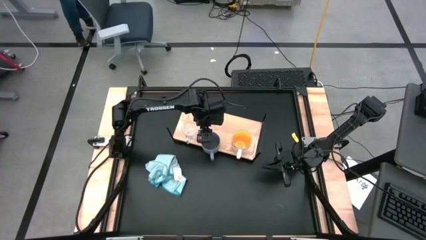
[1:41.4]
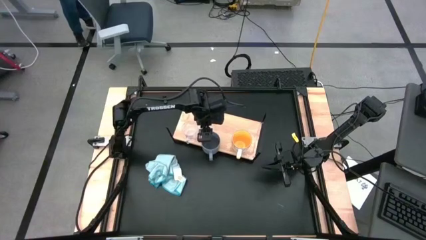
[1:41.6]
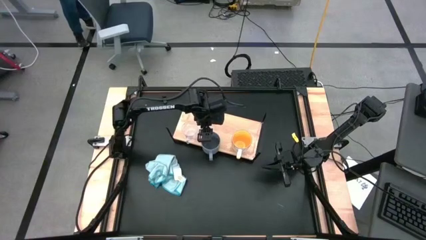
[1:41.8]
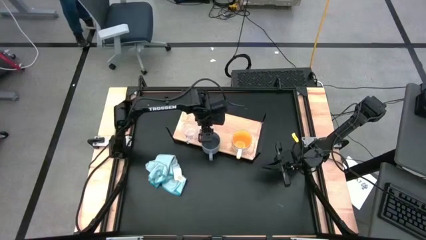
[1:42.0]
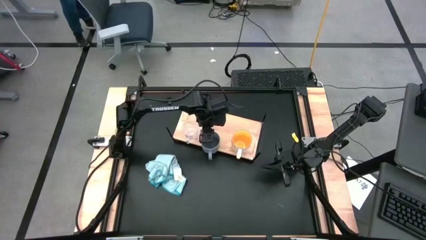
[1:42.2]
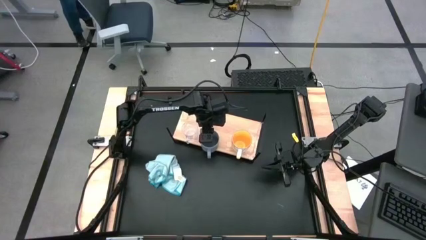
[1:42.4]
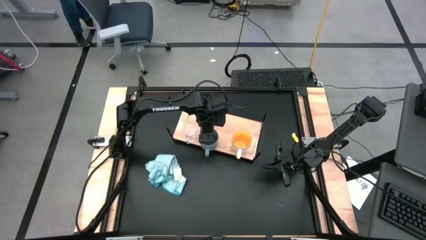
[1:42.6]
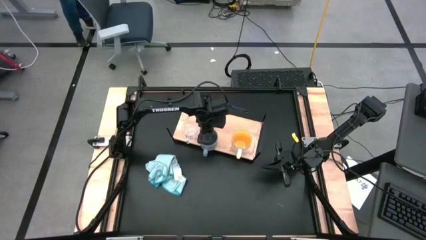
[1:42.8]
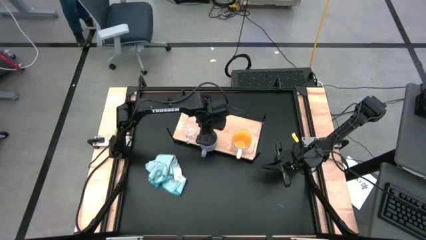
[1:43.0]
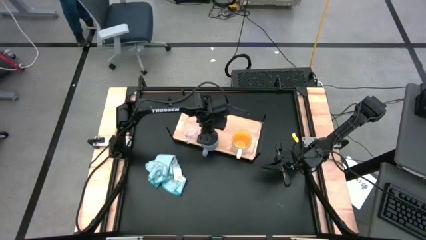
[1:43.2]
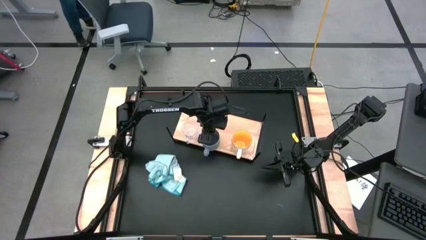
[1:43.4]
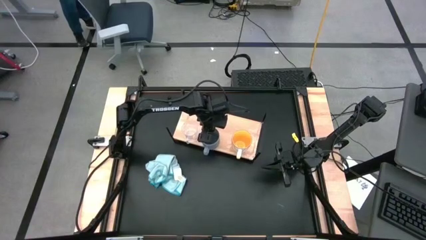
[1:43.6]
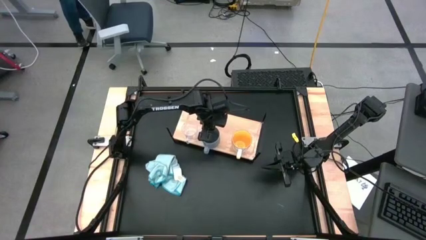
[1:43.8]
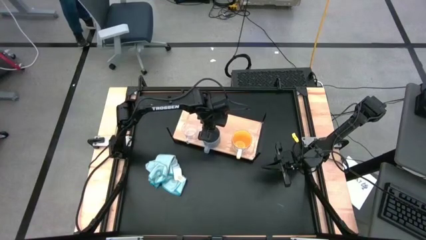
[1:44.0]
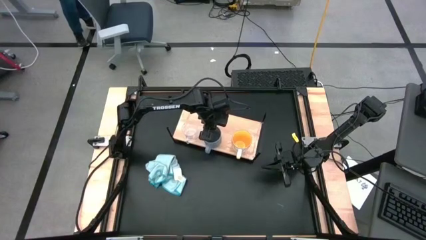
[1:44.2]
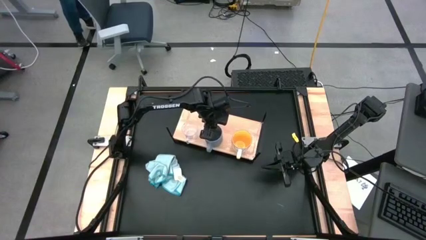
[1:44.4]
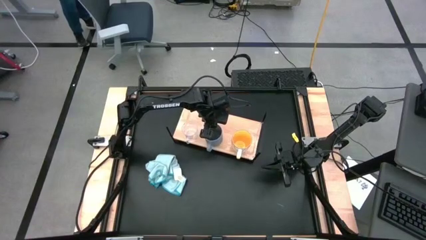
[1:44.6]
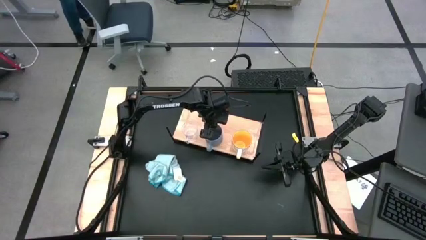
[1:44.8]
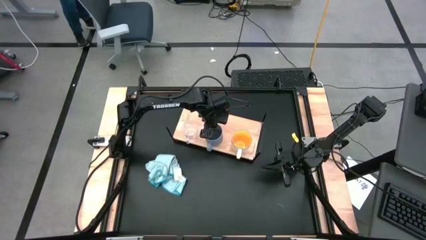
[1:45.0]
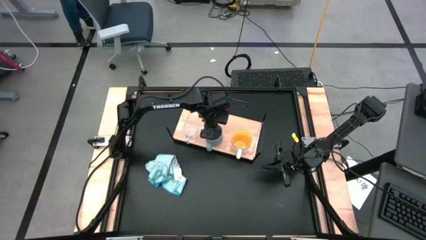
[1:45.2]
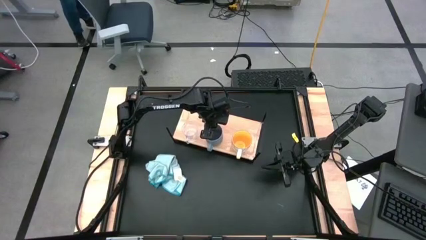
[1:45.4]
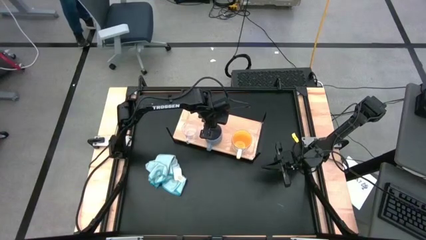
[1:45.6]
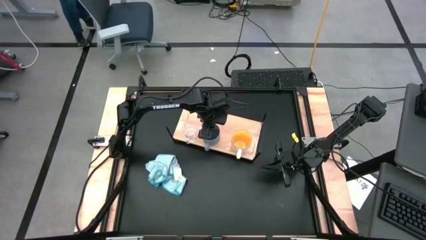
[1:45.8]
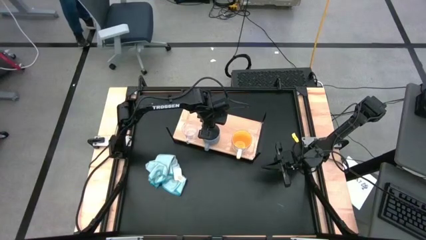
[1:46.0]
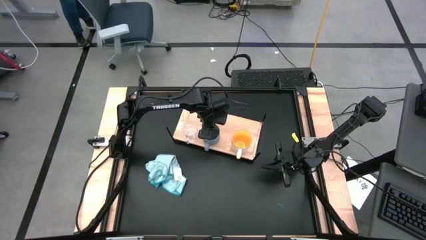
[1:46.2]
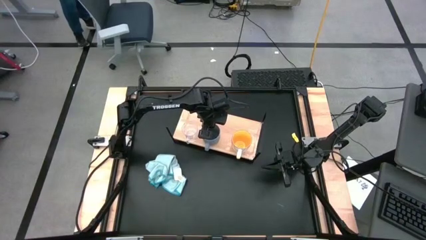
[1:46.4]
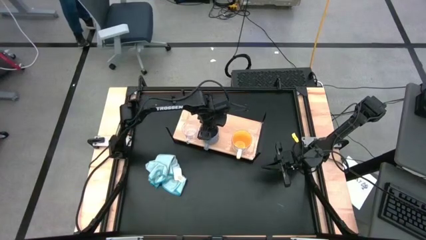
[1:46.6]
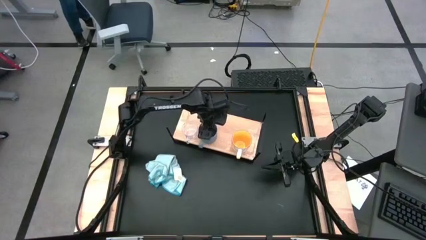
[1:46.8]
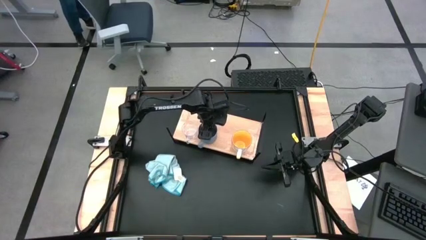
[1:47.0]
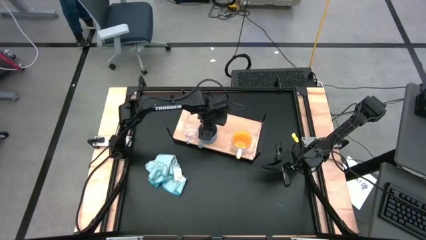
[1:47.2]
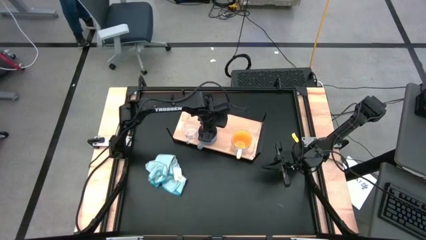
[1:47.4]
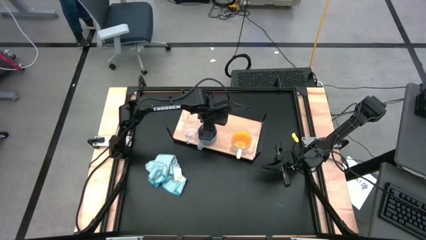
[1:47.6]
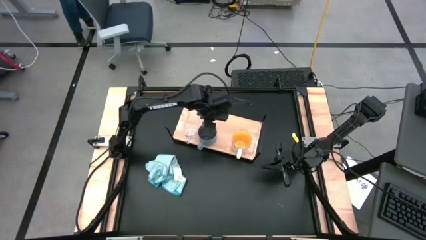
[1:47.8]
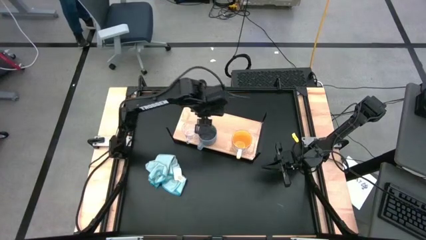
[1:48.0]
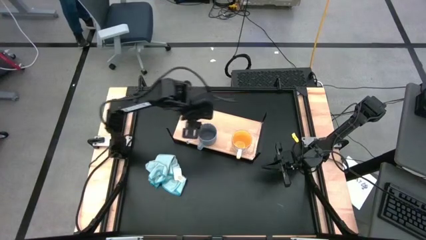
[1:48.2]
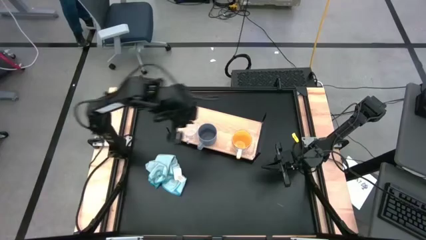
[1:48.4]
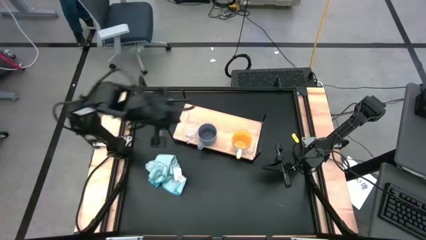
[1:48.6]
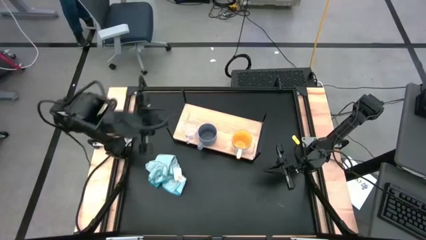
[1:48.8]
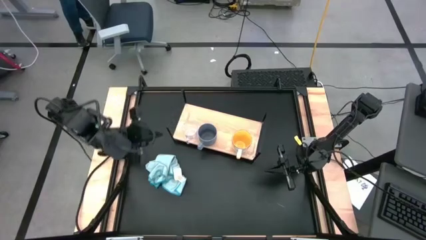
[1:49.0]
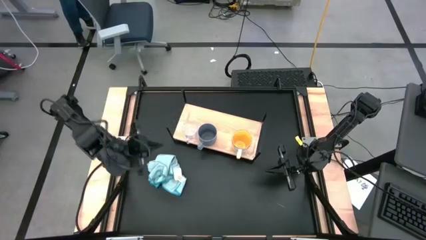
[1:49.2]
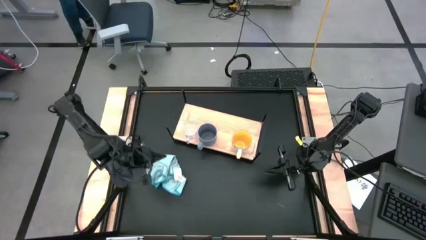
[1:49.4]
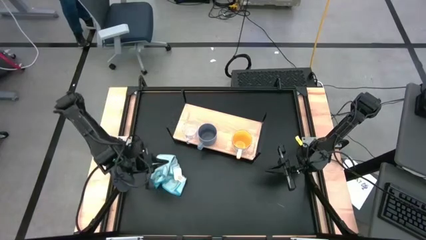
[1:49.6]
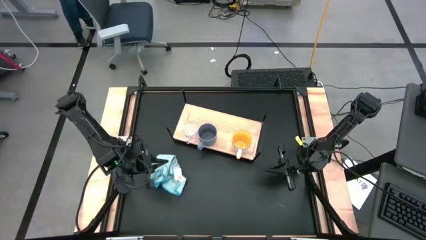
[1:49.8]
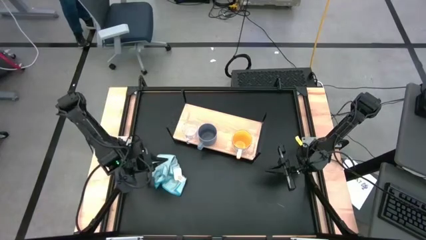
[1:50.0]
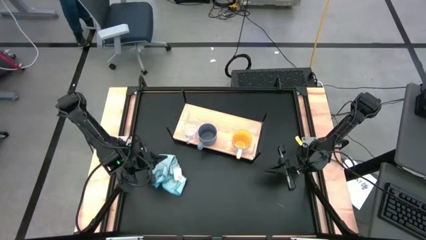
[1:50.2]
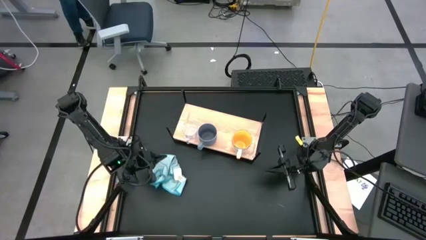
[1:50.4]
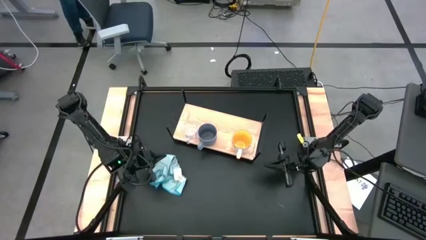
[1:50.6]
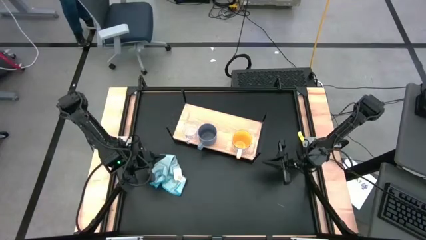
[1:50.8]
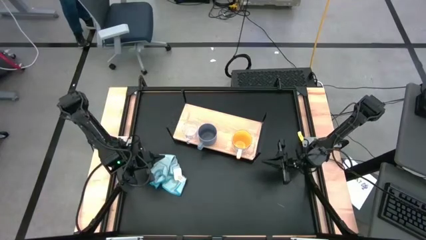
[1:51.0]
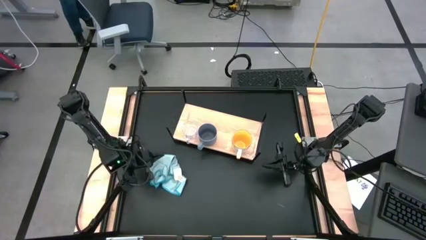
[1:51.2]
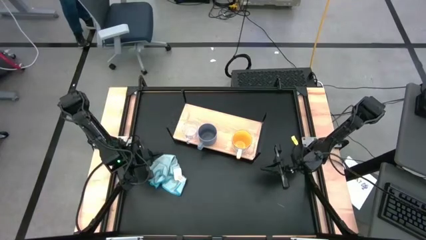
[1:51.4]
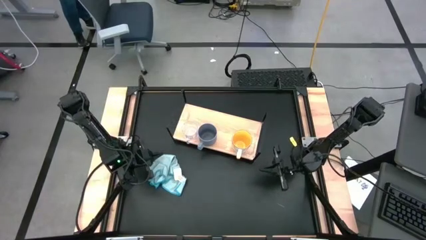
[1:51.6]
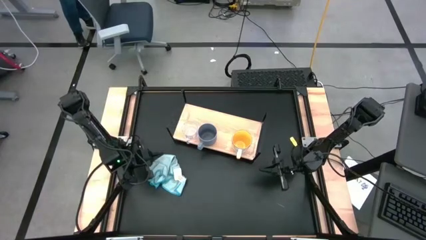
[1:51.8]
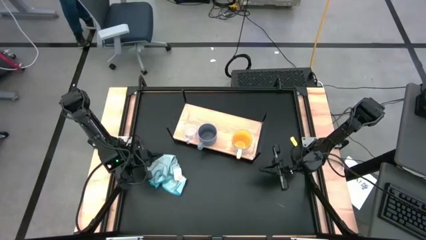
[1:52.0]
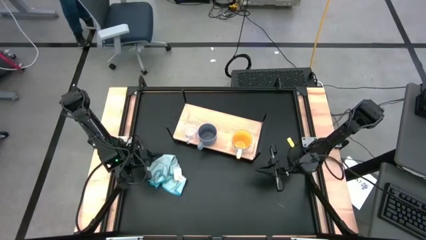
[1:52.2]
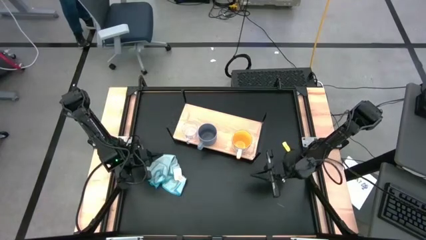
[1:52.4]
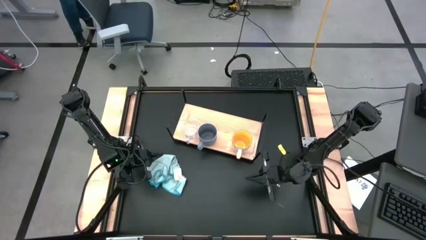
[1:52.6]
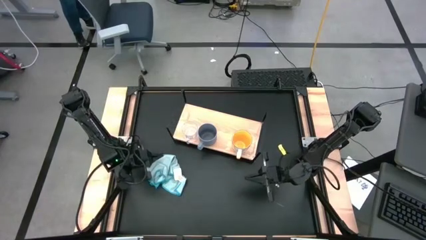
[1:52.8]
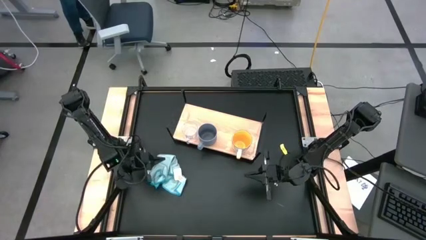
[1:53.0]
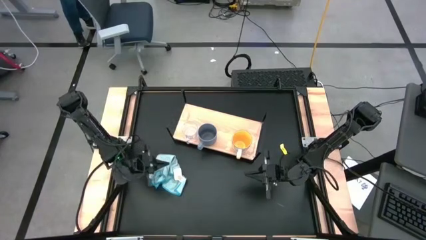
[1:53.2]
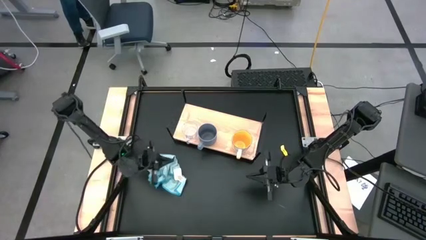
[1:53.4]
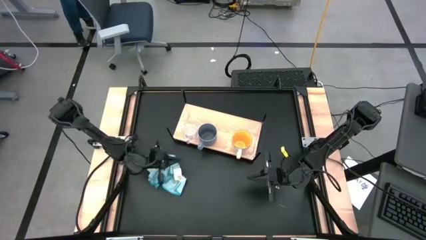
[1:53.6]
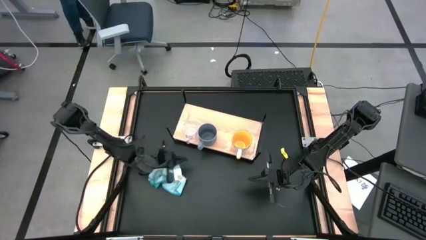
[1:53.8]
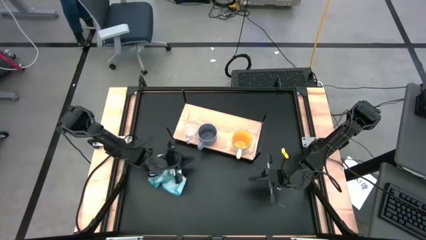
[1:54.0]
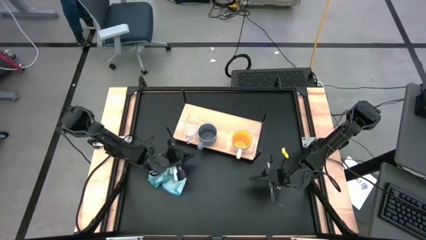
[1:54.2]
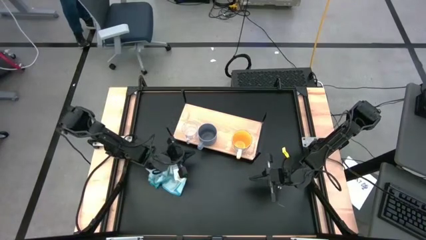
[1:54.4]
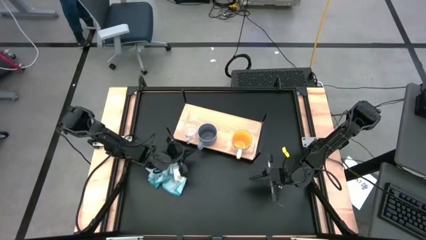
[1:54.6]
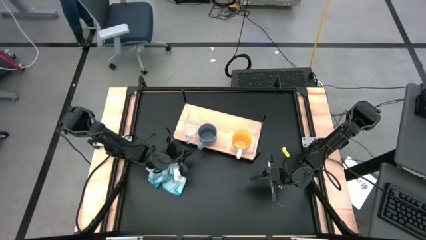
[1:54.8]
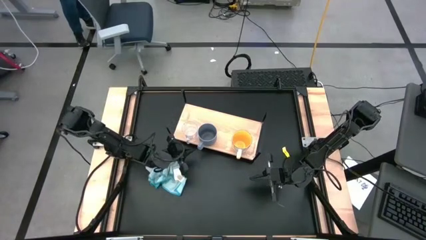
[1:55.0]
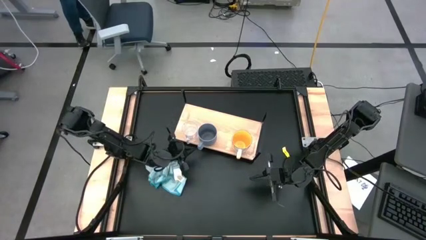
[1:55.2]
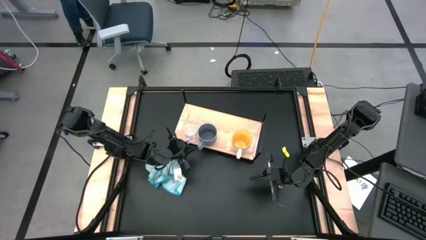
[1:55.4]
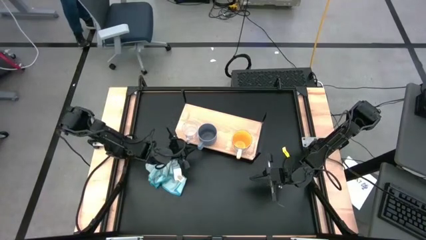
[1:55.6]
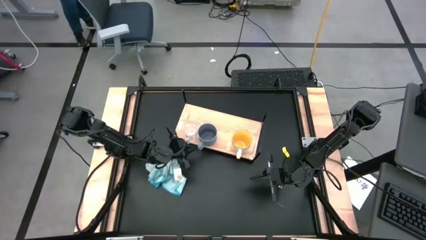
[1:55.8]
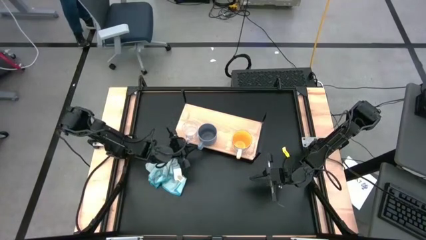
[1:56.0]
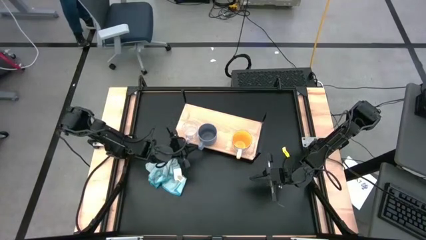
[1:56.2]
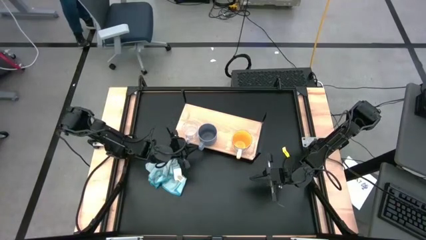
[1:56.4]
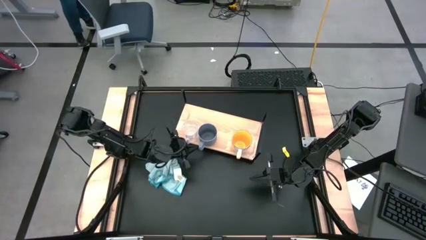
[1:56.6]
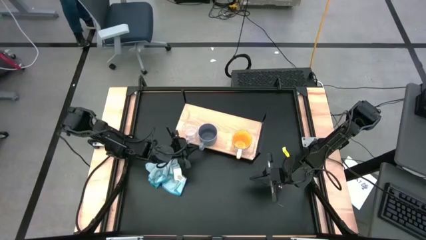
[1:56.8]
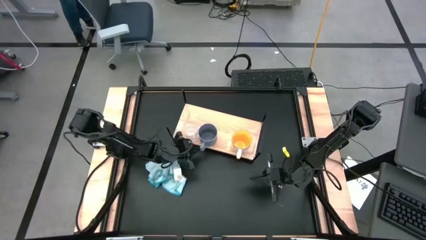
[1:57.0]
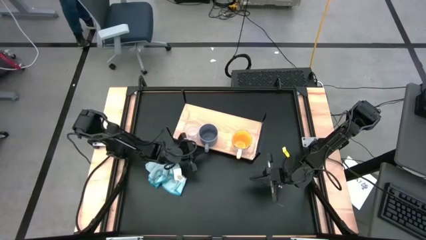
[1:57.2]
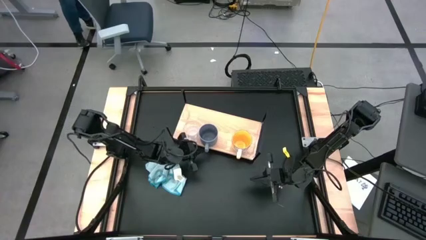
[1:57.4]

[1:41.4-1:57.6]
Task: Stack small to large cups/mugs on shelf
Adjust the mugs on the shelf
